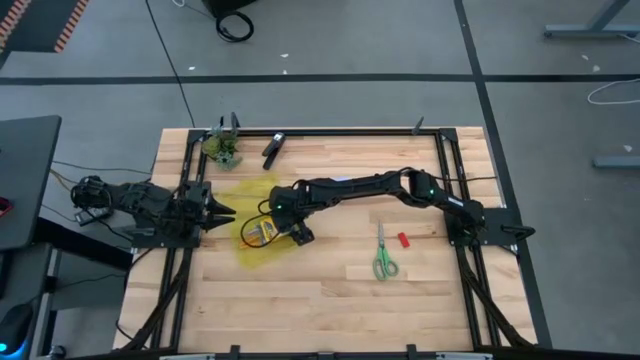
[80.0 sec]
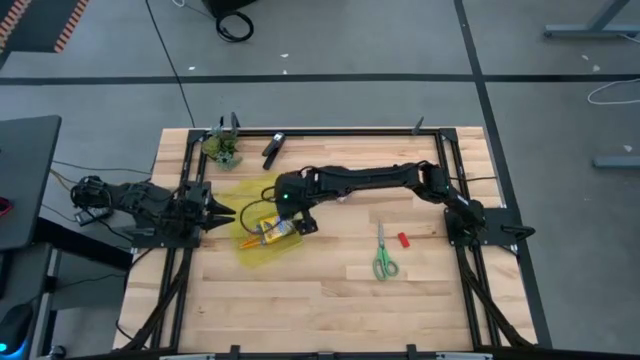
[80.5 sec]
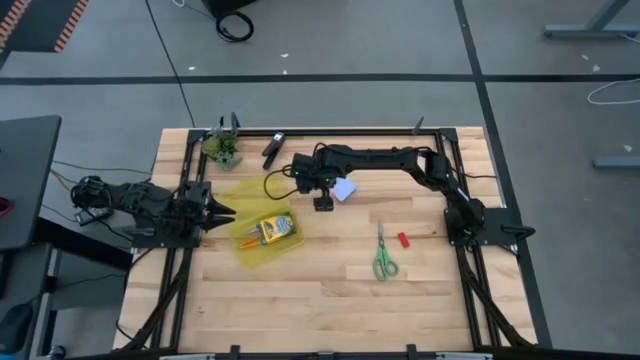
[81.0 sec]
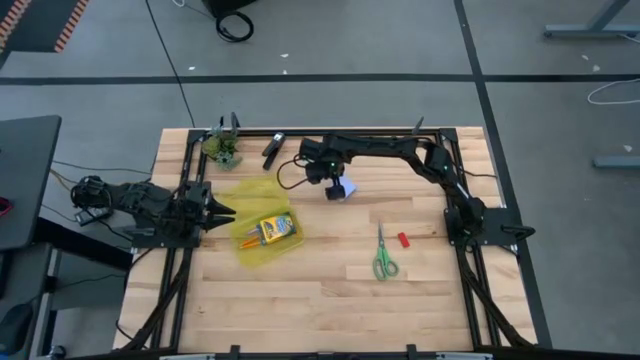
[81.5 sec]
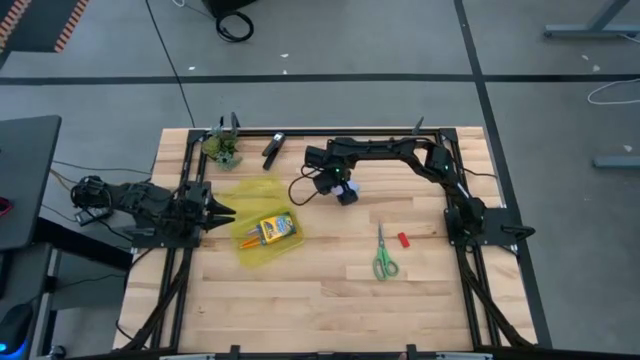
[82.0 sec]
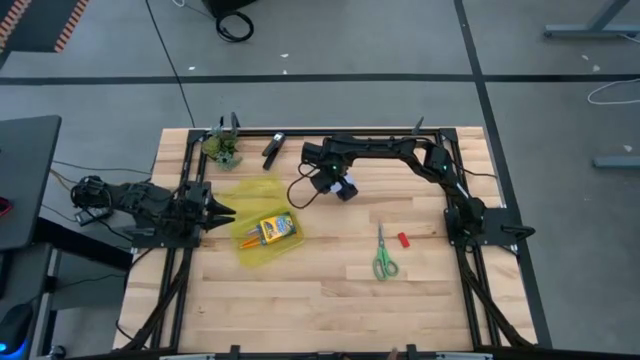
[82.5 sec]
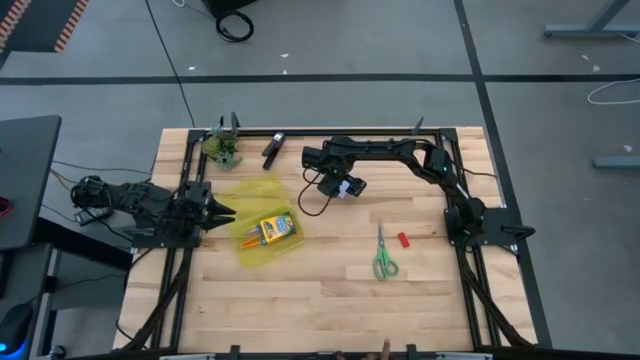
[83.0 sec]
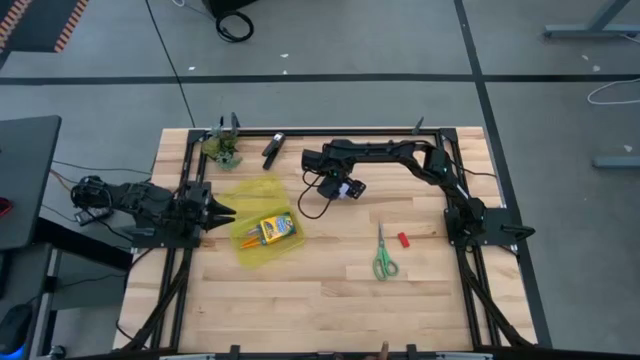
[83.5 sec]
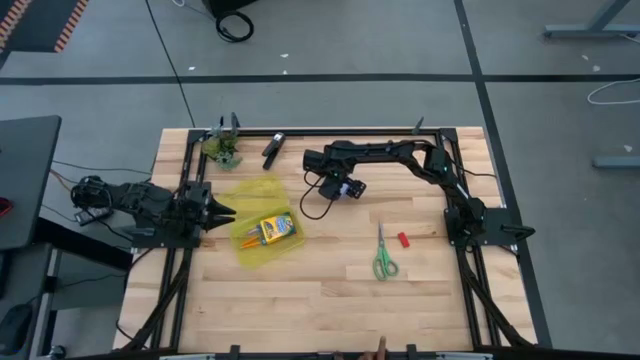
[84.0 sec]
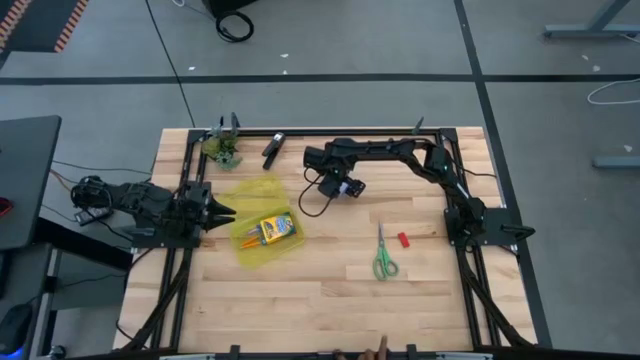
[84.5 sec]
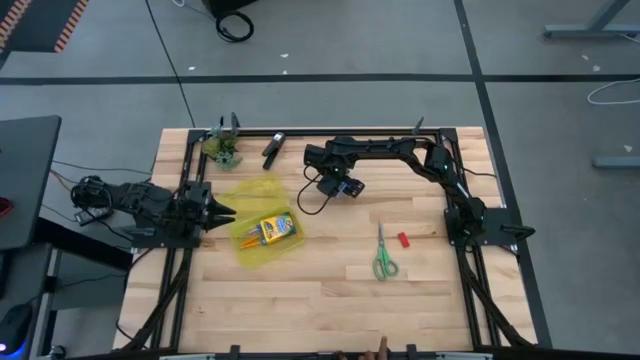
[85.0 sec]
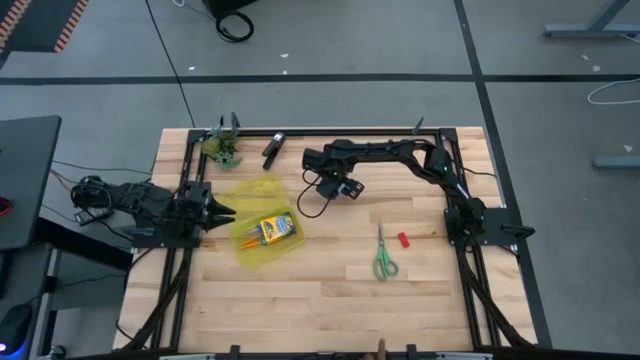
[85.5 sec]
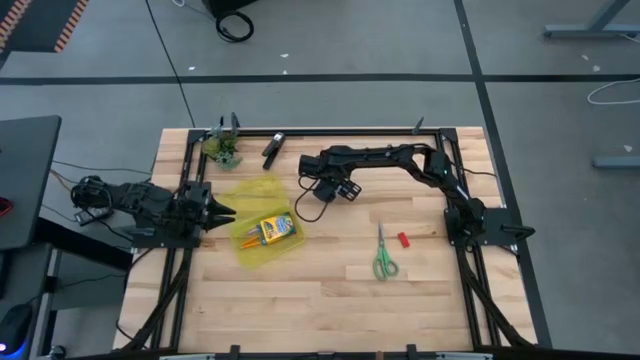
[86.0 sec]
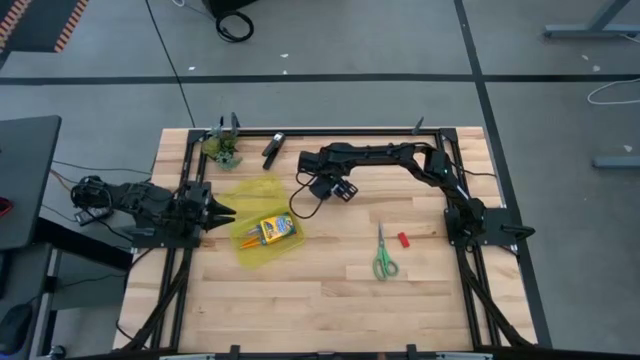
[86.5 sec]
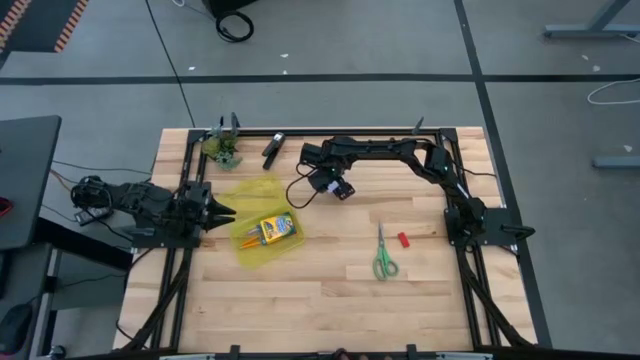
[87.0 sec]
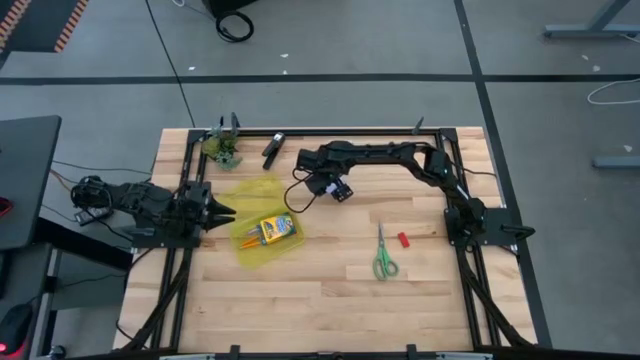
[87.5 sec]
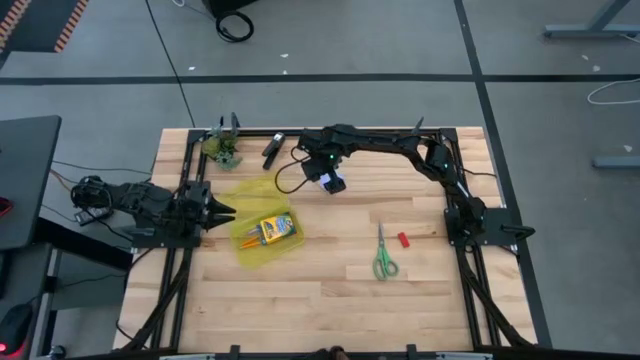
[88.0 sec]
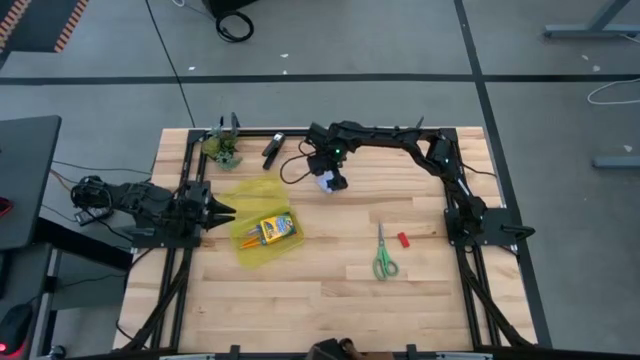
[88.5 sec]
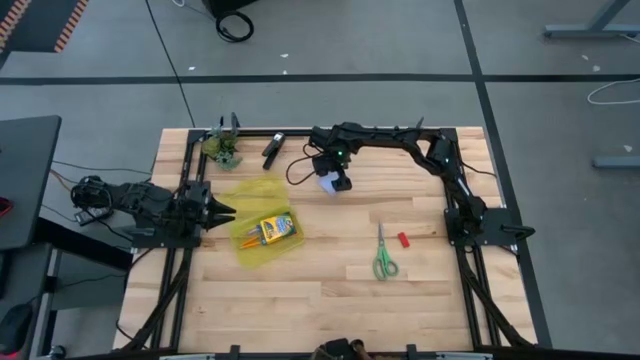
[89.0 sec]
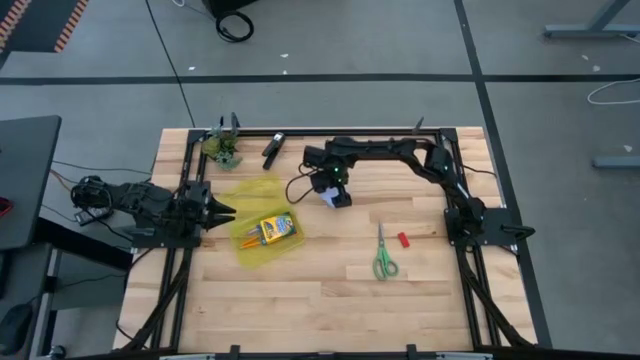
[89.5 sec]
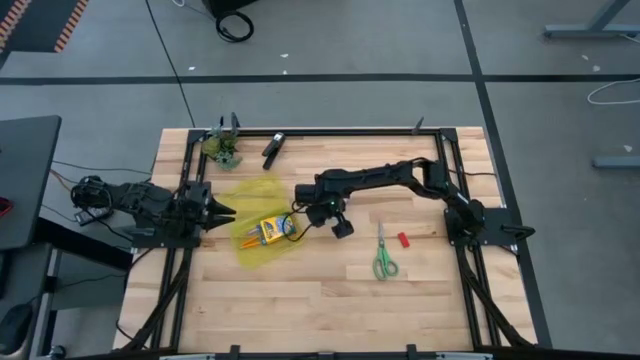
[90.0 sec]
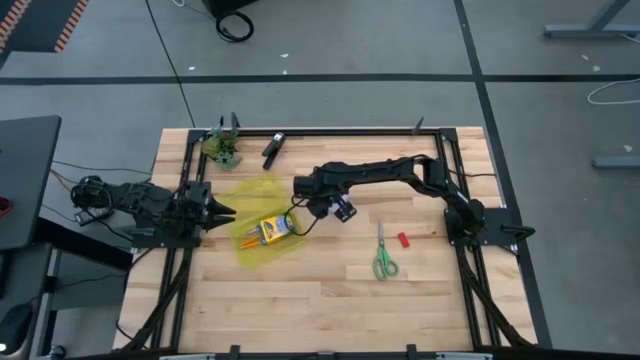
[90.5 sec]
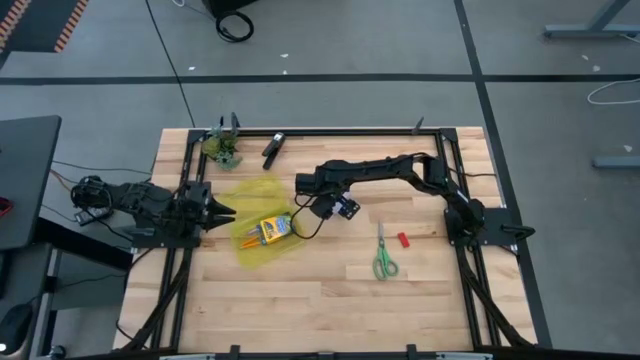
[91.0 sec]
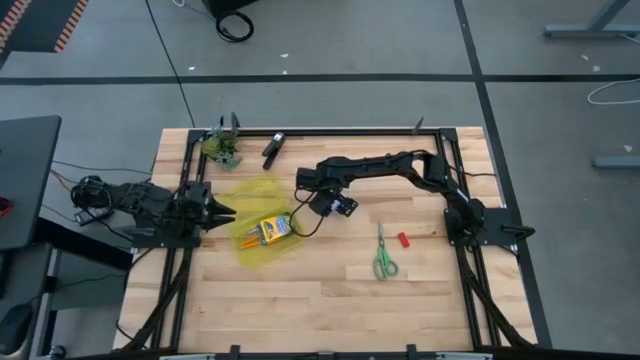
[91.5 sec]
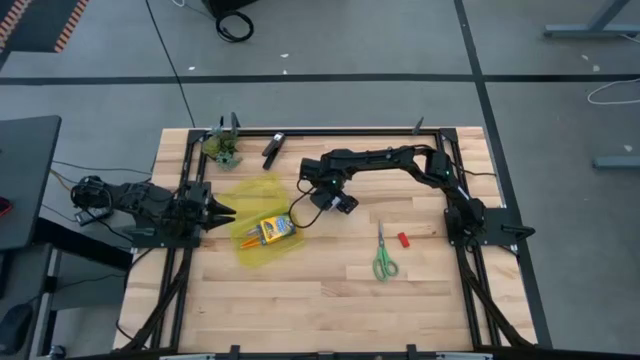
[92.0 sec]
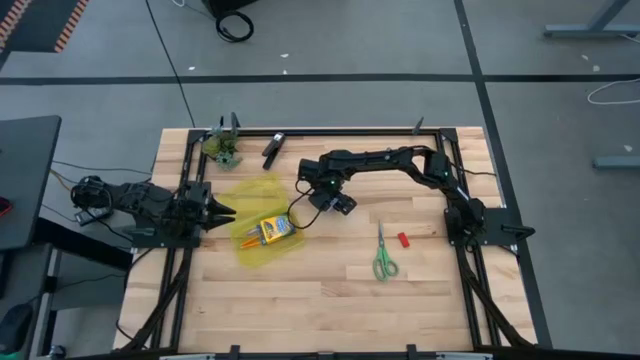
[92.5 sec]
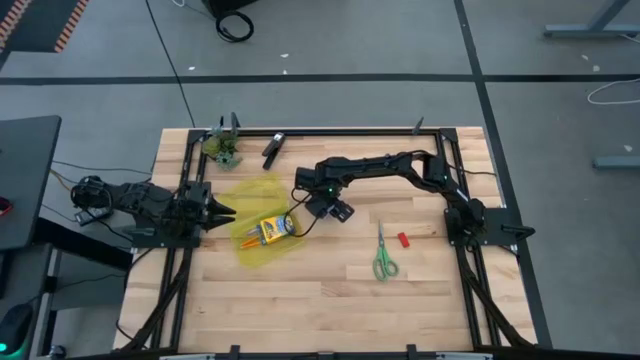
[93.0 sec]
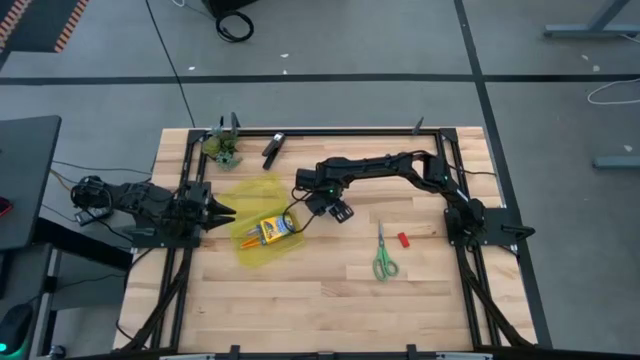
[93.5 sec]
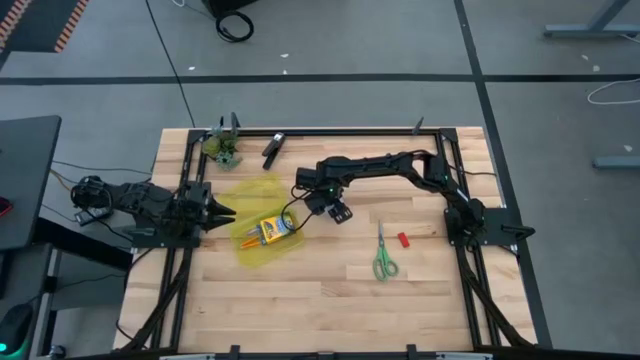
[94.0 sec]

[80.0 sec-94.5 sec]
Task: Pack school essentials
Put the white sticky notes into the yellow supply box

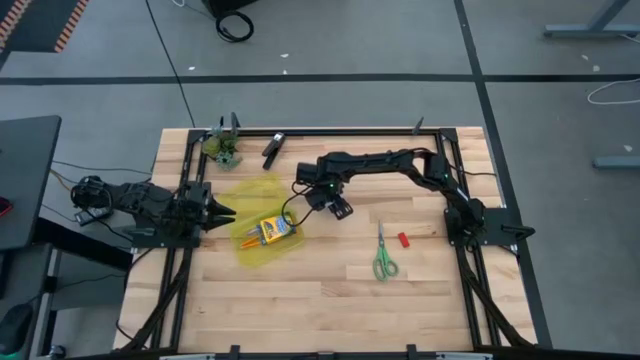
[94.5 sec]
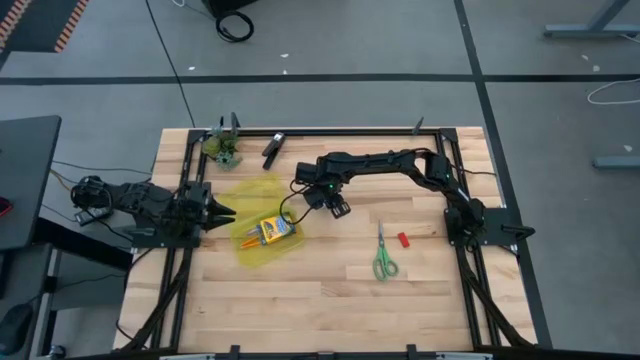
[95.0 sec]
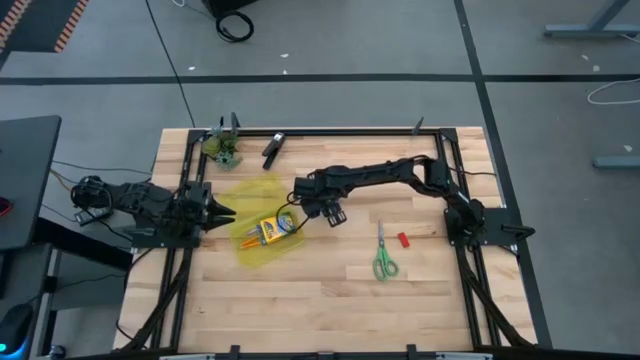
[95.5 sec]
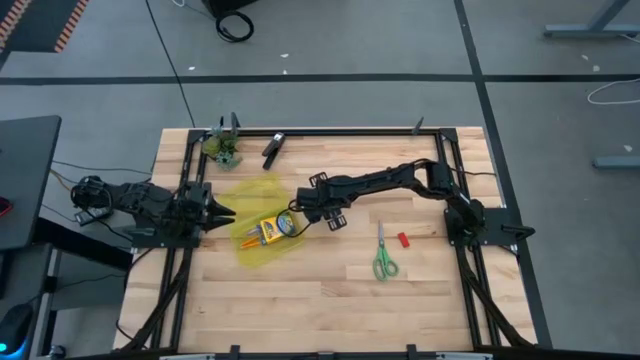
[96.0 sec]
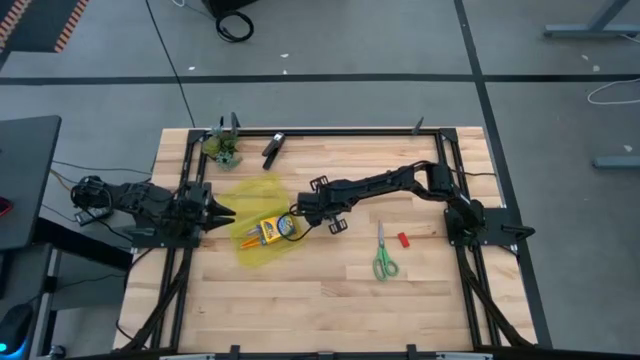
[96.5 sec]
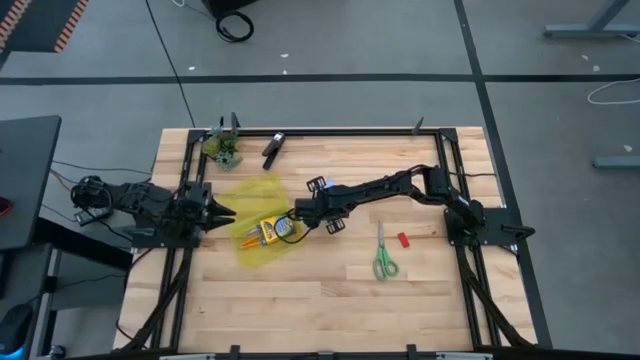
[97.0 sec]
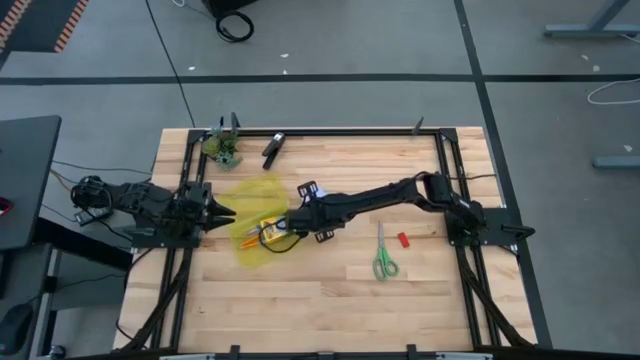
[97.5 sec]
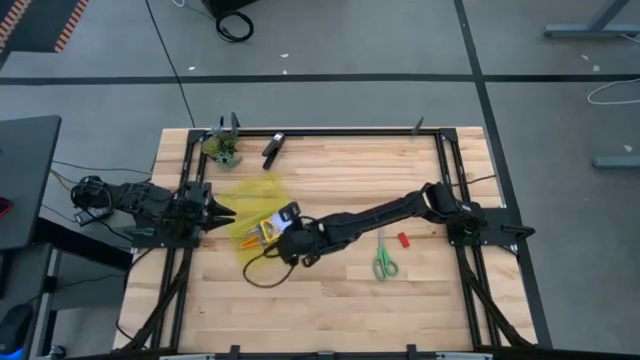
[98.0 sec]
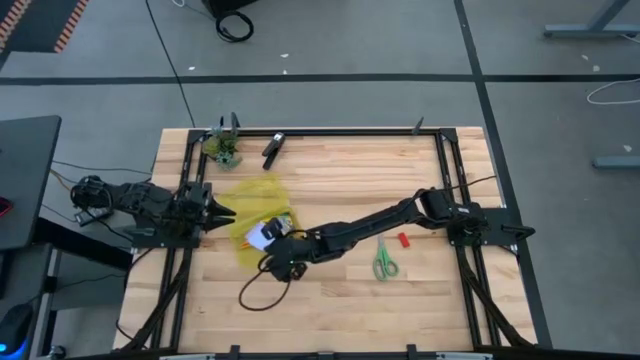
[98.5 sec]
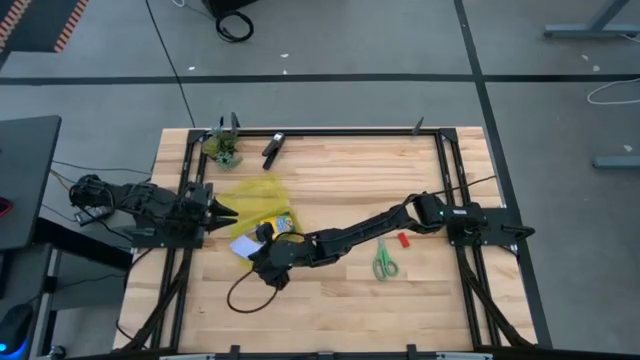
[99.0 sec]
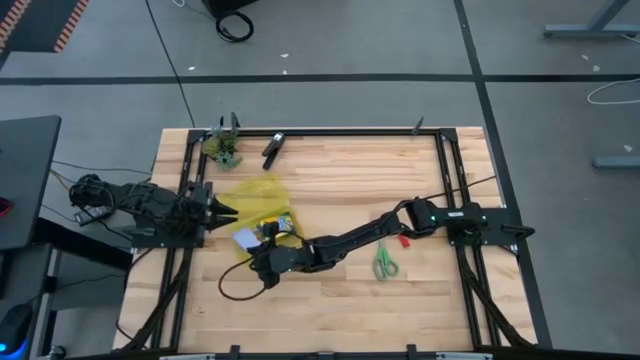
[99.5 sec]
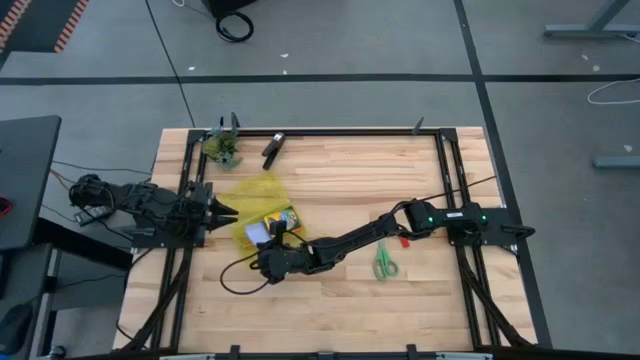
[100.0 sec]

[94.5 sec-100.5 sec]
Put the white sticky notes into the yellow supply box
